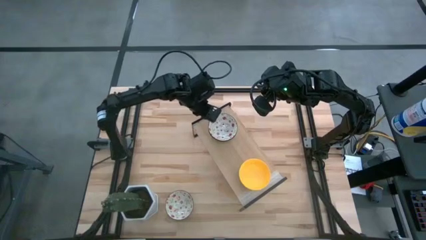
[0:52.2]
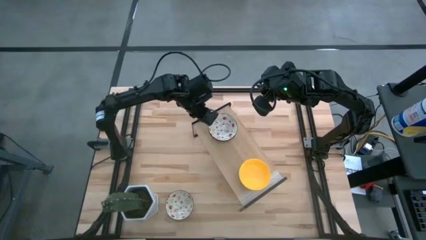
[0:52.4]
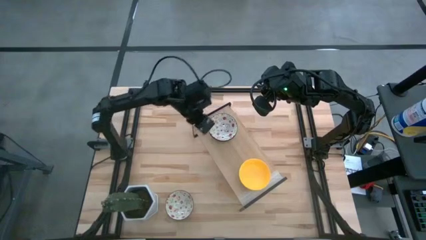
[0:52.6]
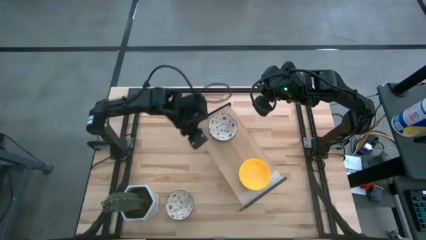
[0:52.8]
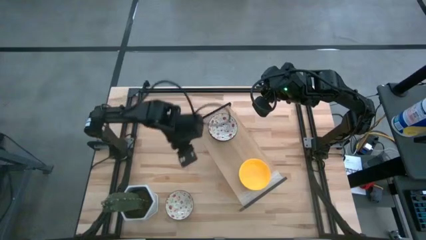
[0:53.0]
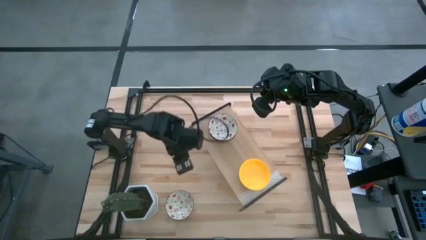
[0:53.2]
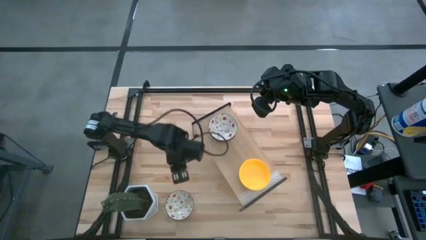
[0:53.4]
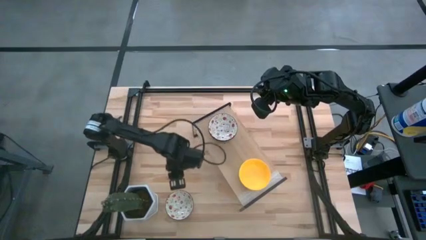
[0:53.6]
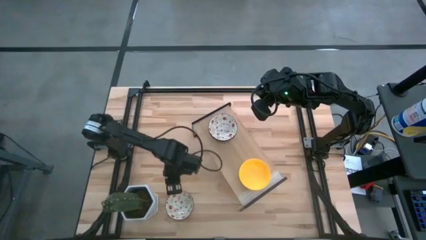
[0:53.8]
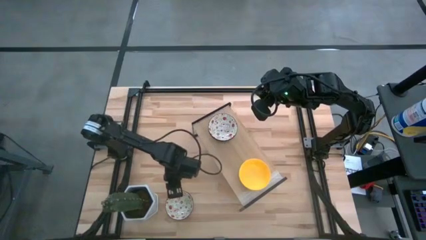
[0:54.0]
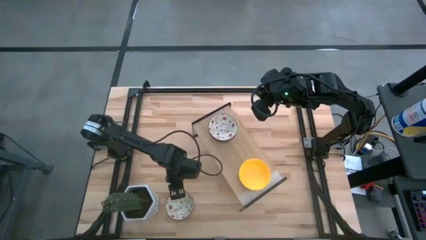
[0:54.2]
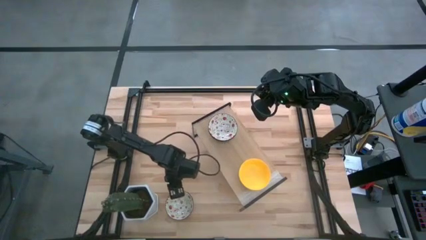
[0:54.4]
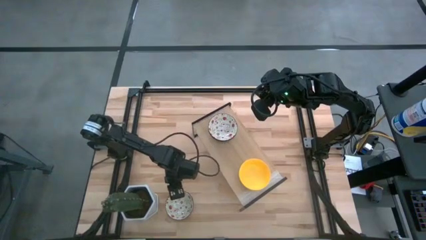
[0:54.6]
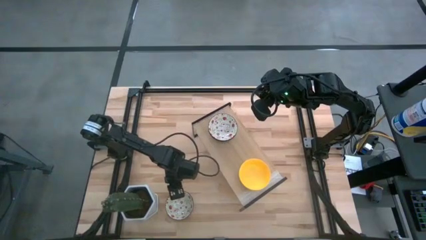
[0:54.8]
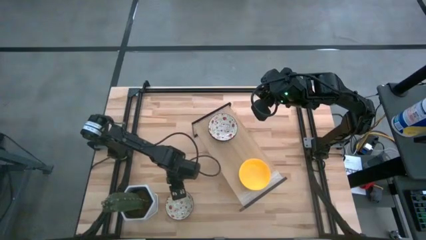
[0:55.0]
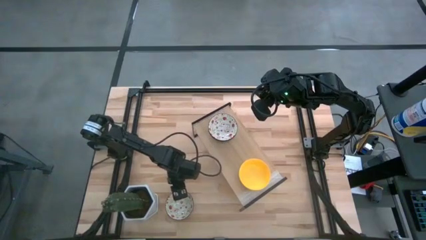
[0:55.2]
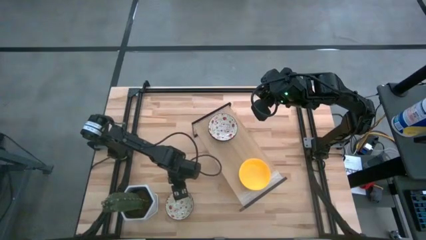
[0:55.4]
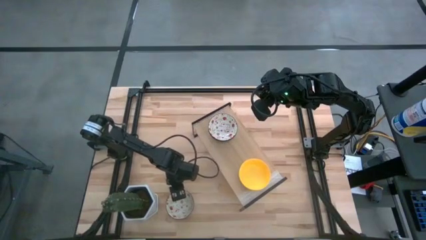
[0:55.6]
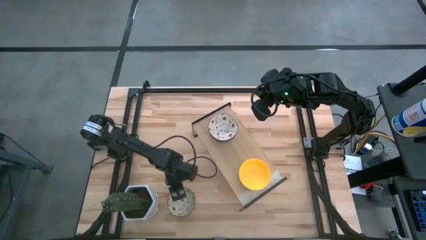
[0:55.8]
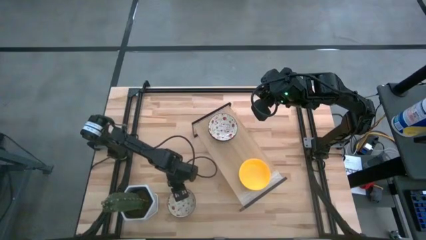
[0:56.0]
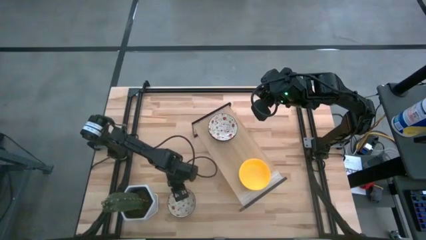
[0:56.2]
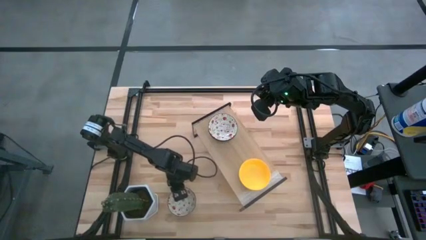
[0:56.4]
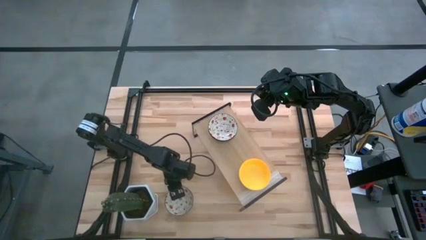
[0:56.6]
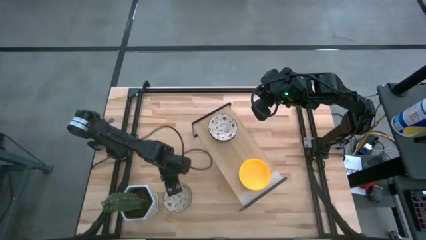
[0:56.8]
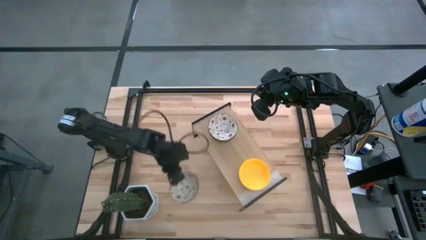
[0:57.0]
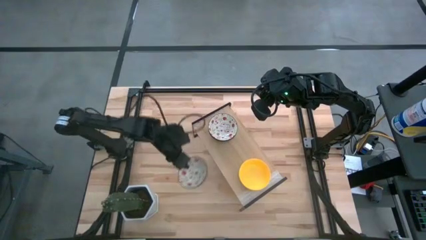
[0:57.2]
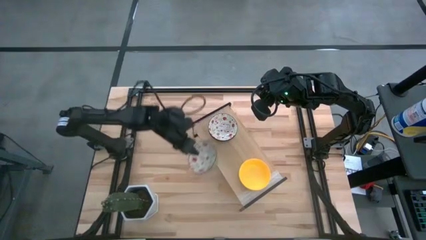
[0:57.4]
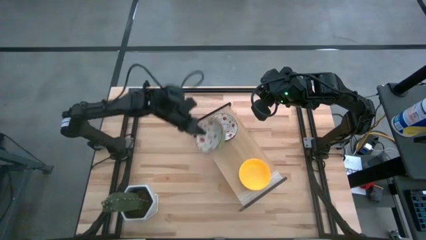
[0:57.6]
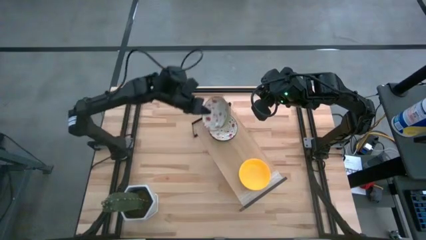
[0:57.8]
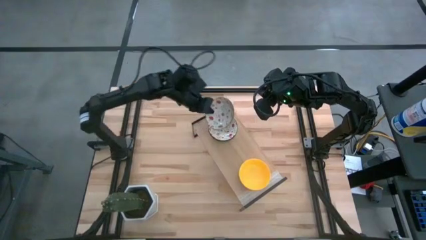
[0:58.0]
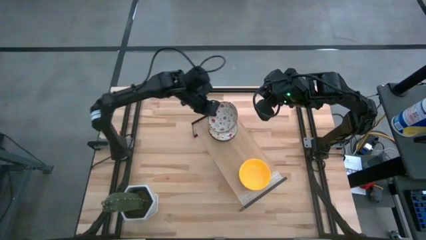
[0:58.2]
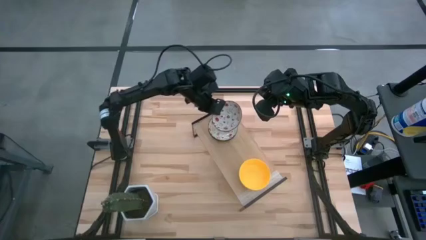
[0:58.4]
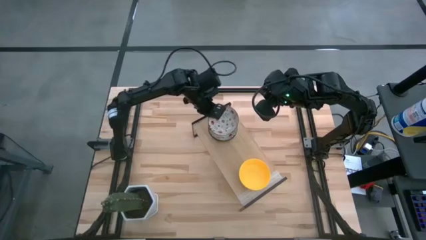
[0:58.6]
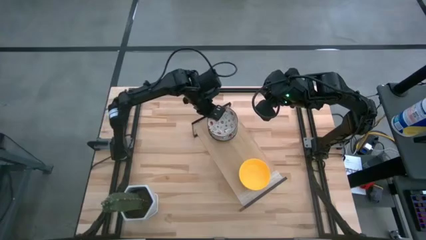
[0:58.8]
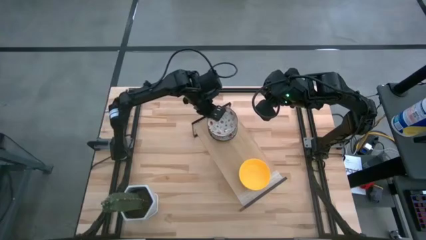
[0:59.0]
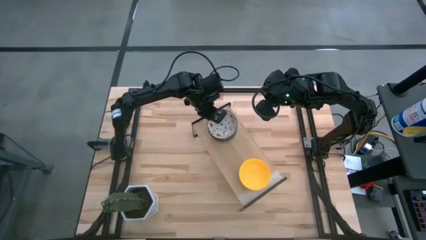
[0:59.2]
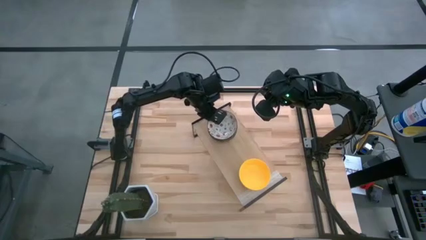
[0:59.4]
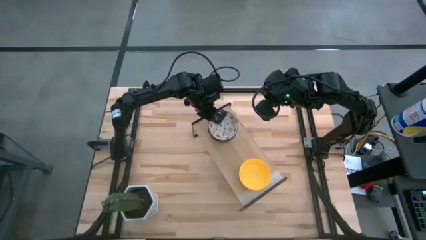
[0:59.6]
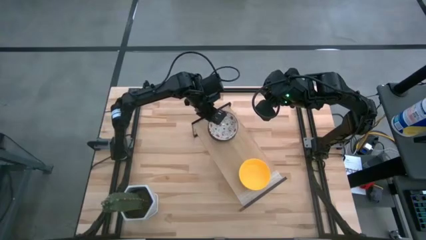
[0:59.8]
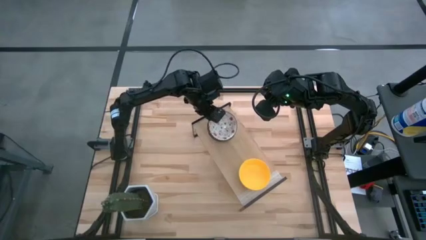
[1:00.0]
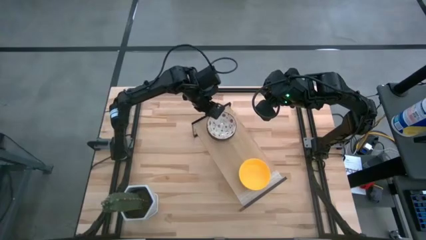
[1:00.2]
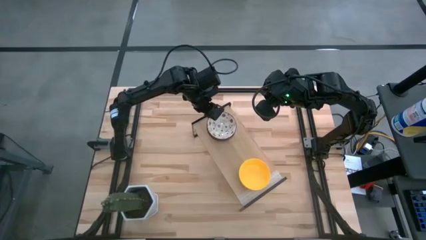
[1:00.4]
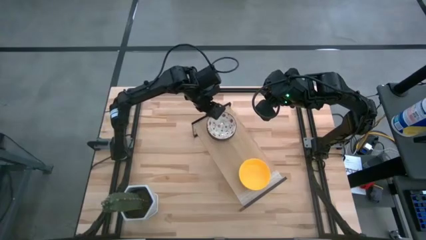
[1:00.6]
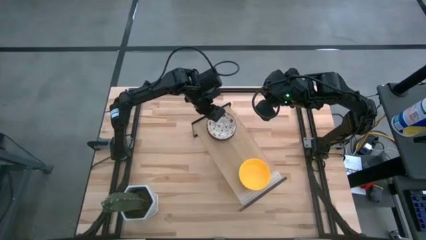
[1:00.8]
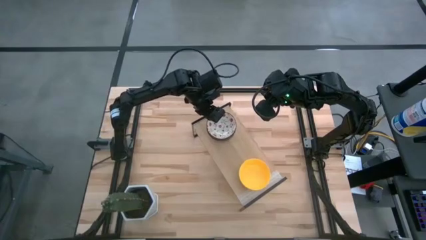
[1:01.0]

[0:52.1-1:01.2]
Task: Pick & Place Mini bowls
Stack the white bowl on the white bowl on the shelf

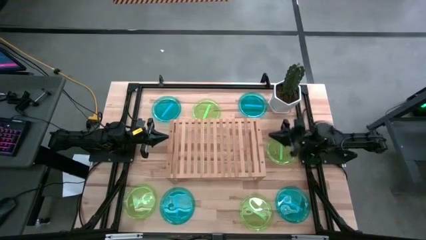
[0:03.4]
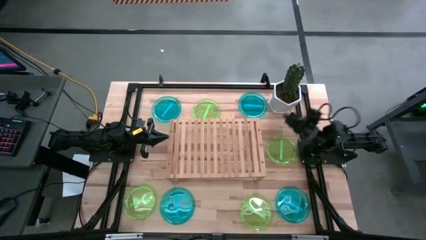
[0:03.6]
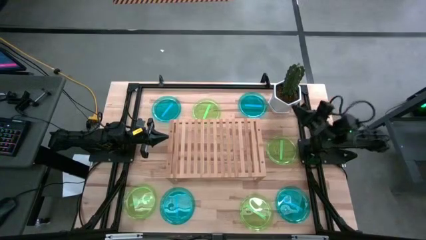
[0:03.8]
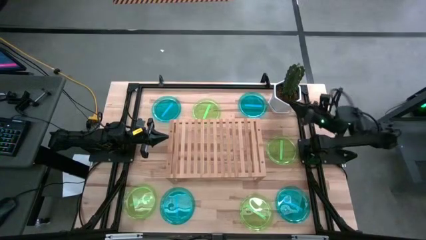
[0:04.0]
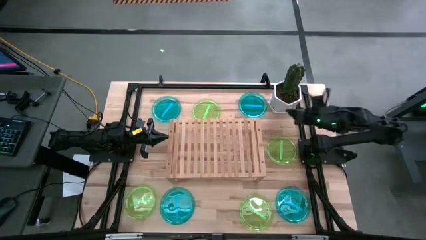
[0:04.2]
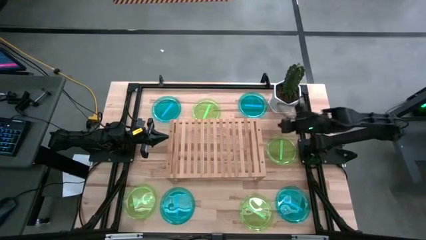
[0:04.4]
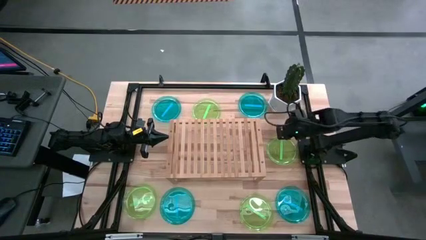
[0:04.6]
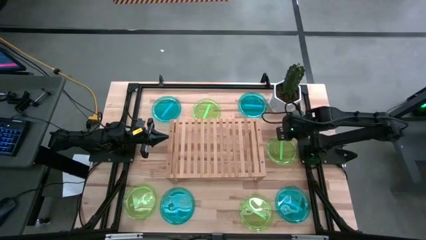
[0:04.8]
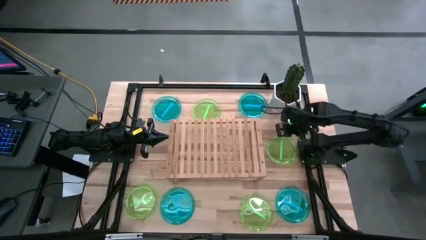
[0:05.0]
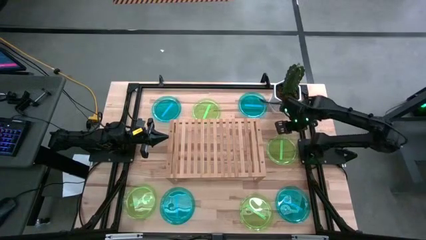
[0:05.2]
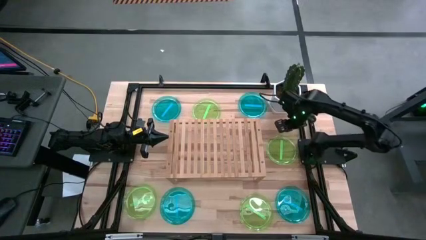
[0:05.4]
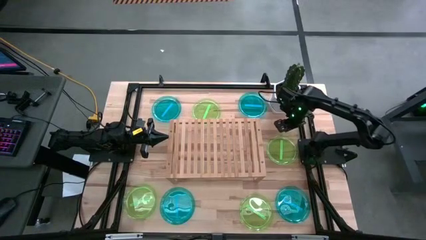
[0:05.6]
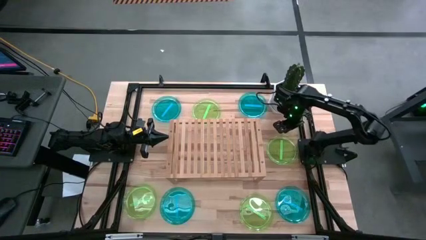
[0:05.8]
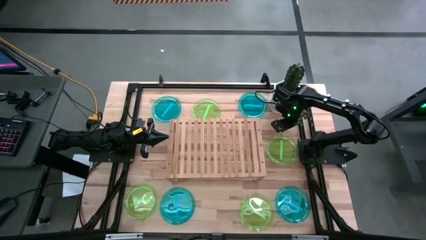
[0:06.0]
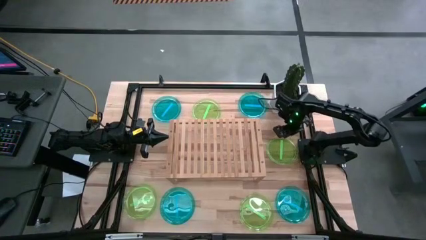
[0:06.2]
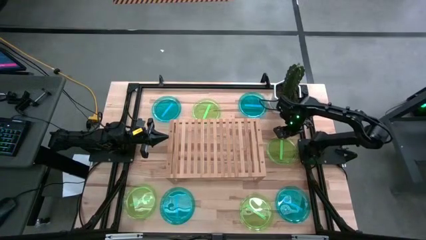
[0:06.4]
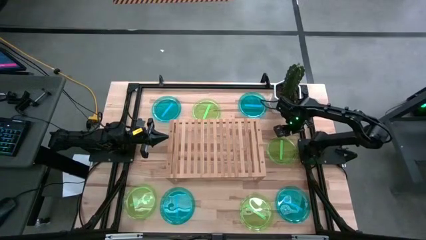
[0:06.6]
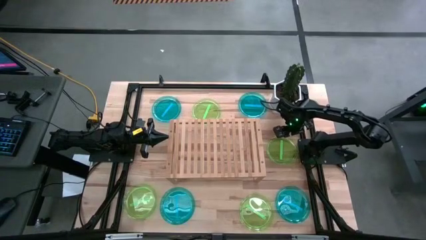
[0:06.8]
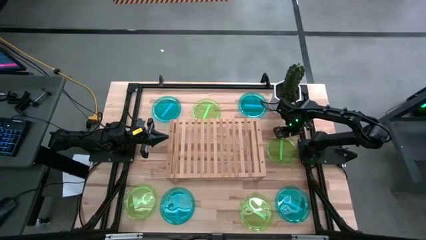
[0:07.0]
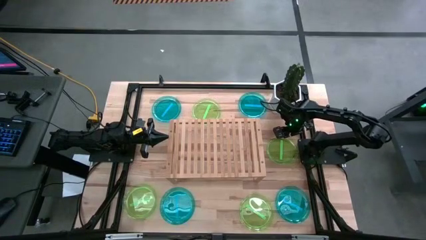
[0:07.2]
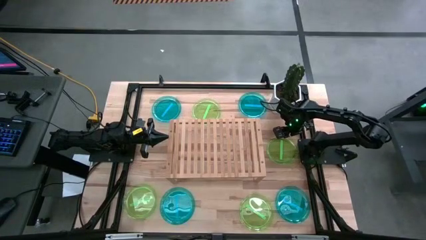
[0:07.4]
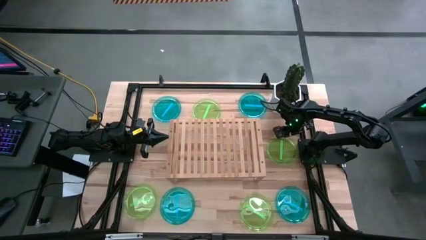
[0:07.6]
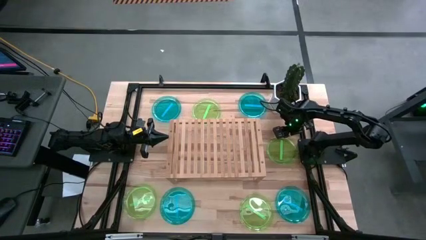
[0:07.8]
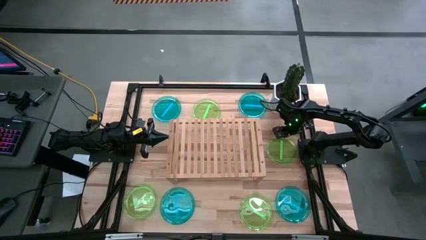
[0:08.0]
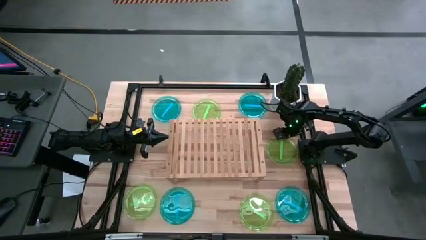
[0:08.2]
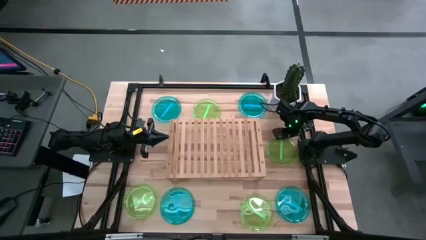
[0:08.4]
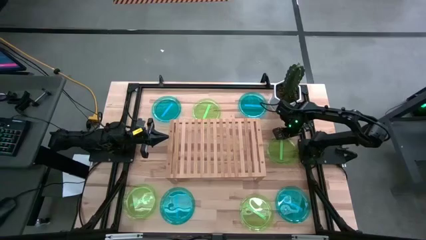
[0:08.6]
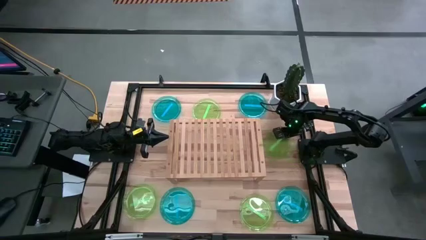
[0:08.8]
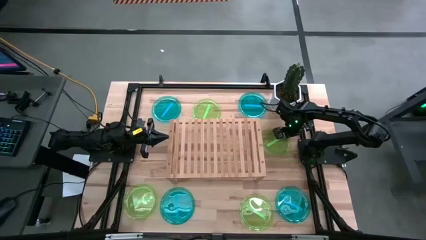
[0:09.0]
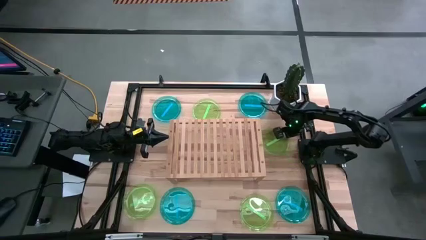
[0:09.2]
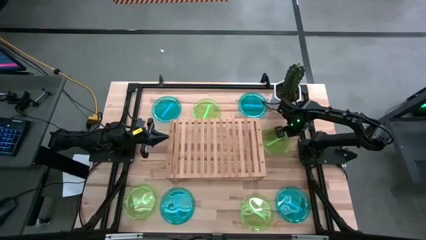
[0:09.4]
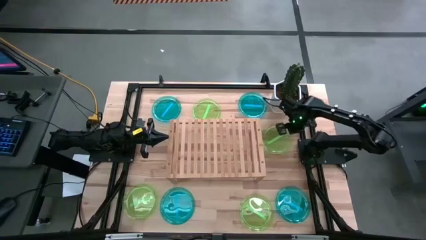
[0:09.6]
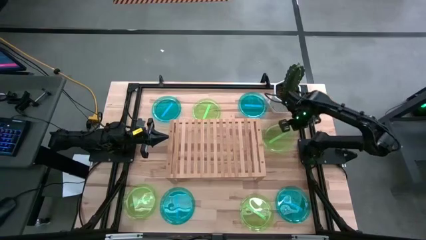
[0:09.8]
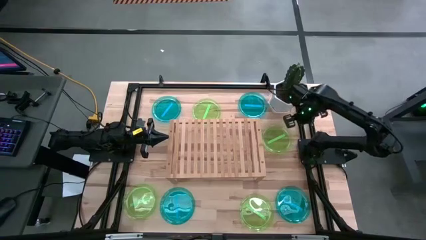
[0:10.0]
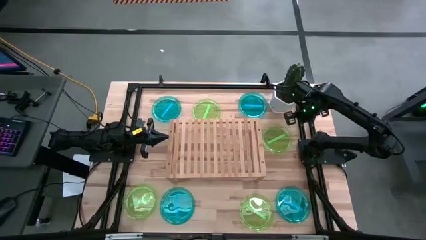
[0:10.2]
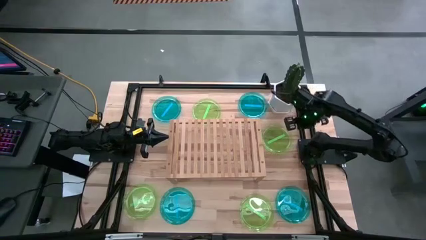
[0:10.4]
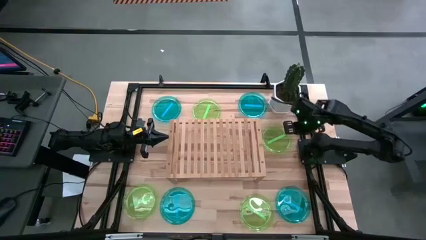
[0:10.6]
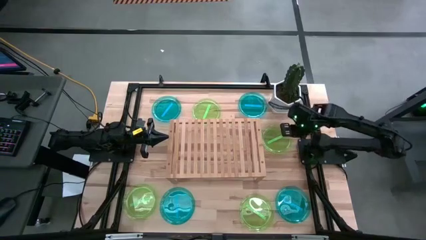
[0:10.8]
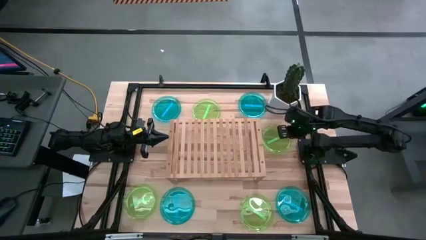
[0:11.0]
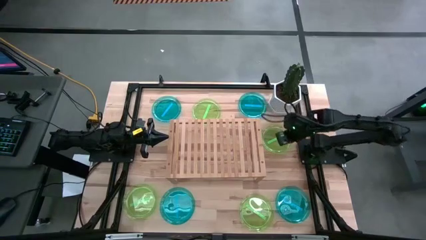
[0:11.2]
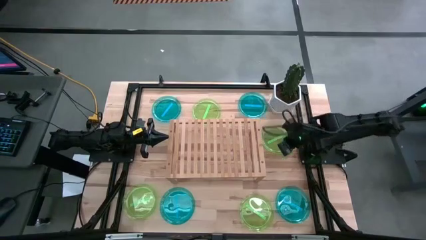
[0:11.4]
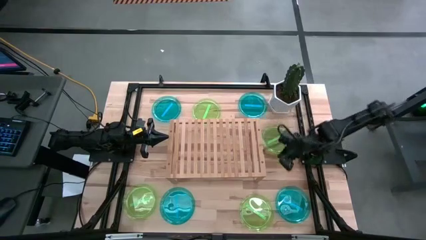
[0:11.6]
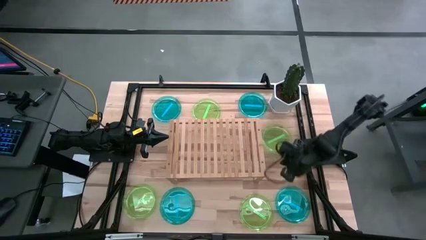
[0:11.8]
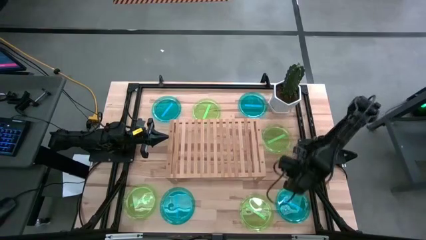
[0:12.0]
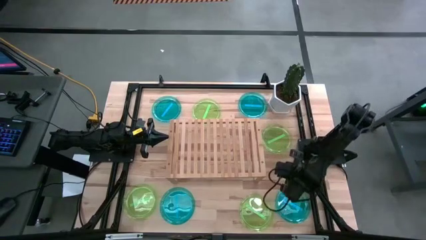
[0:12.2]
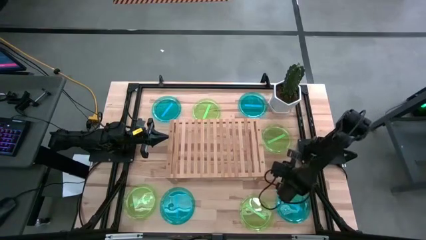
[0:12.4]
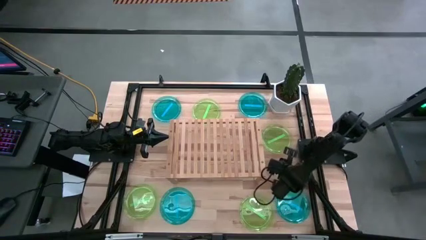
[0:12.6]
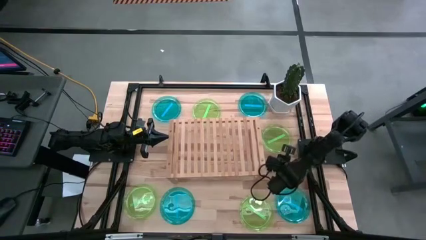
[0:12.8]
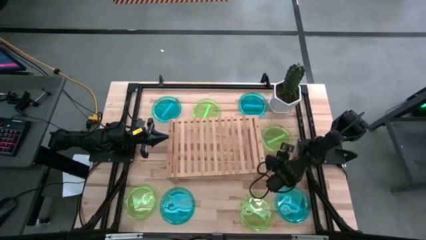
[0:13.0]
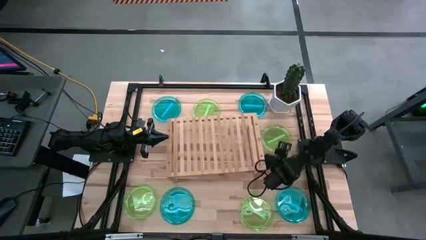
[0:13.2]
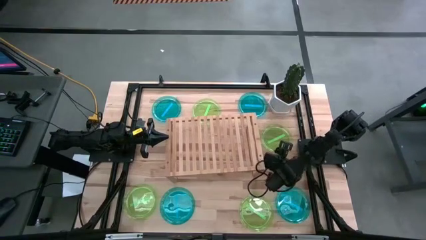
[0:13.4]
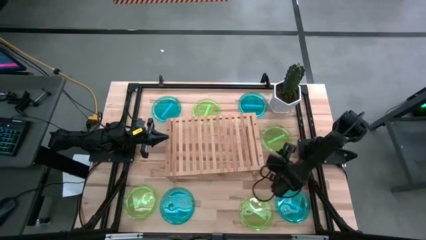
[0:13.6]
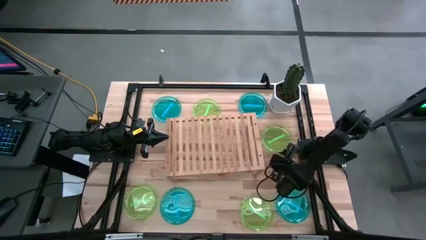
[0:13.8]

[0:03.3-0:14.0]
Task: Place and stack plates onto a shelf
Put the green plate on the shelf
